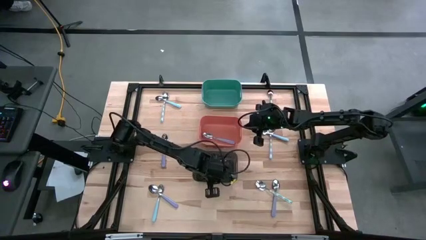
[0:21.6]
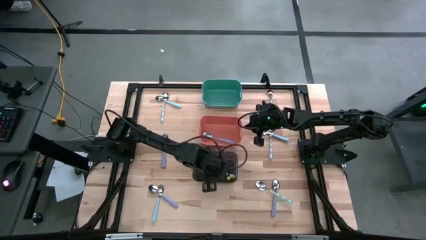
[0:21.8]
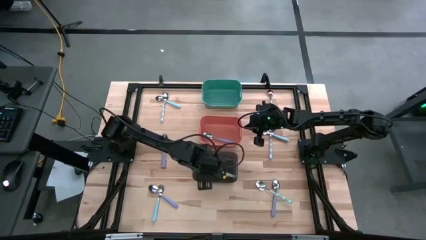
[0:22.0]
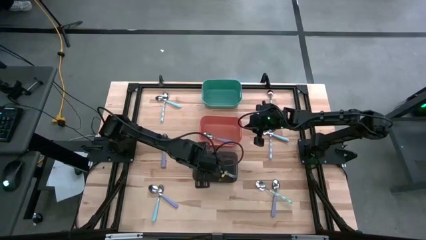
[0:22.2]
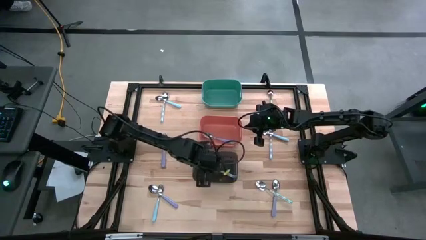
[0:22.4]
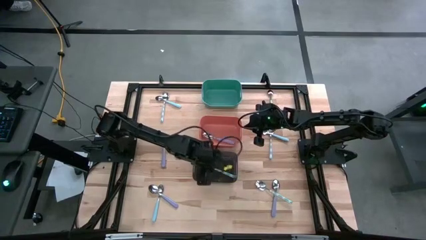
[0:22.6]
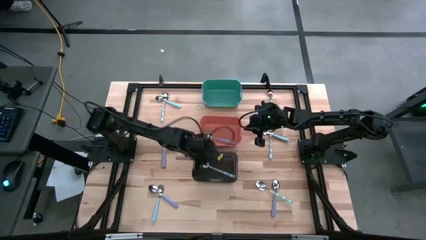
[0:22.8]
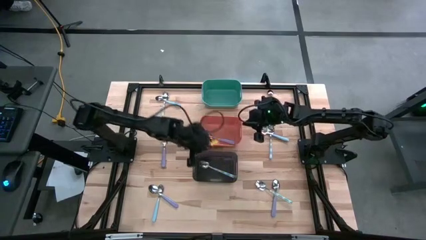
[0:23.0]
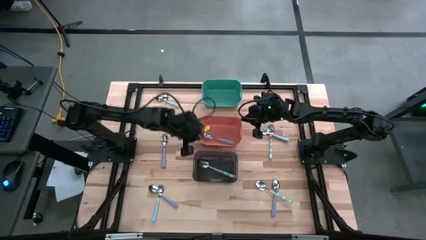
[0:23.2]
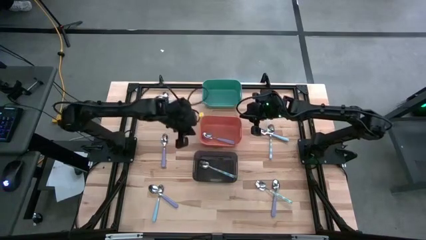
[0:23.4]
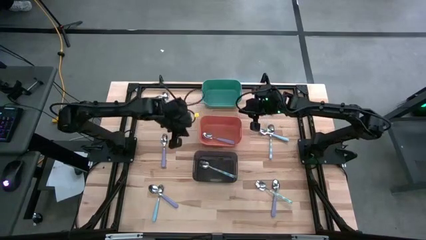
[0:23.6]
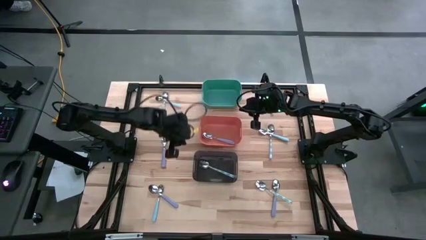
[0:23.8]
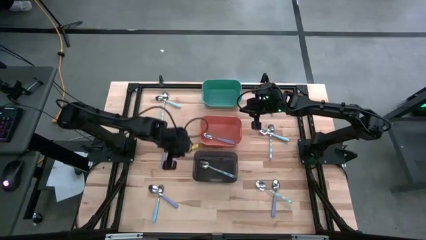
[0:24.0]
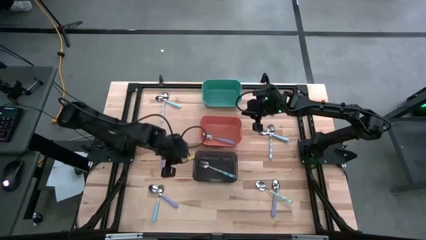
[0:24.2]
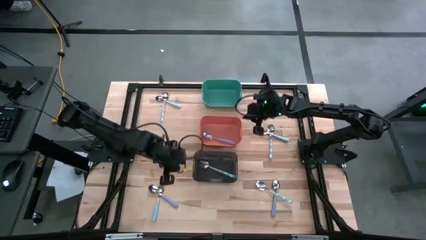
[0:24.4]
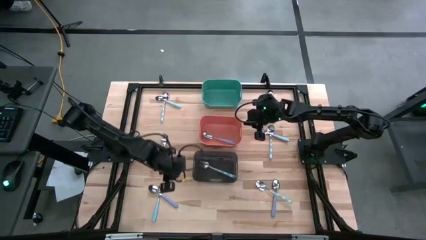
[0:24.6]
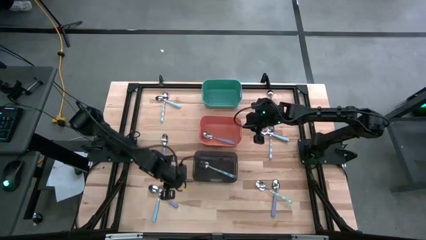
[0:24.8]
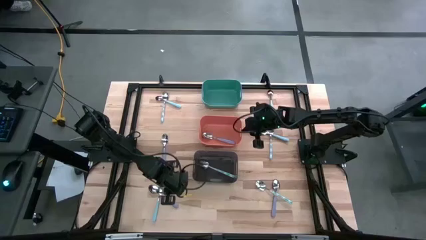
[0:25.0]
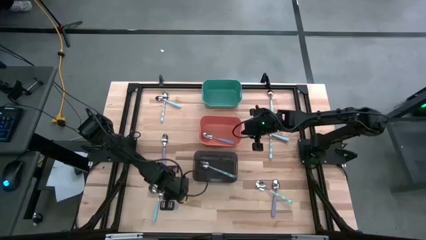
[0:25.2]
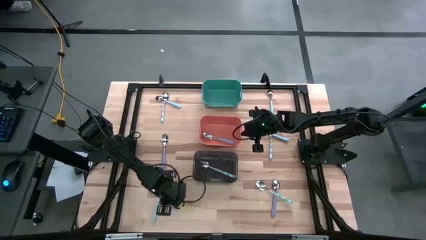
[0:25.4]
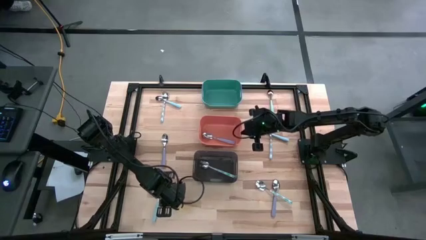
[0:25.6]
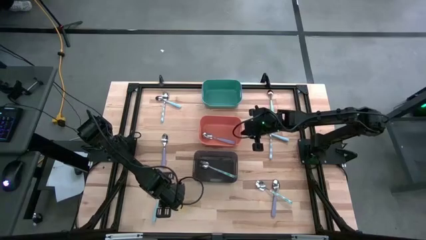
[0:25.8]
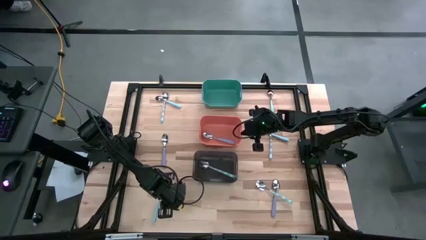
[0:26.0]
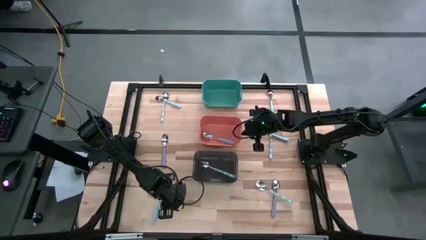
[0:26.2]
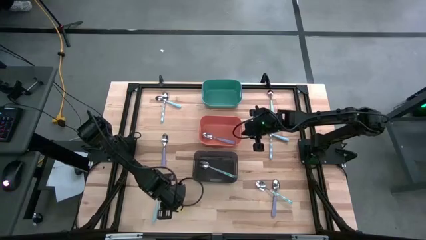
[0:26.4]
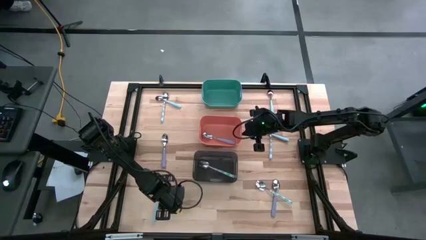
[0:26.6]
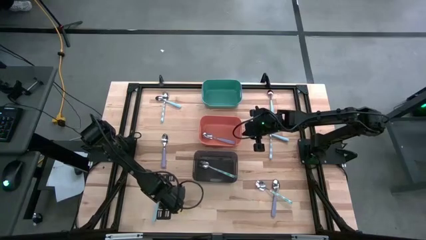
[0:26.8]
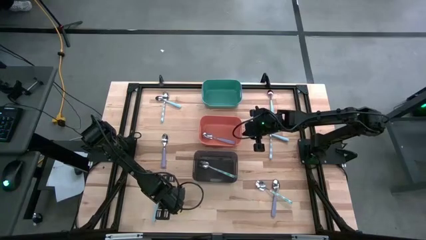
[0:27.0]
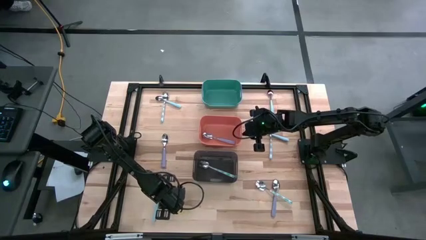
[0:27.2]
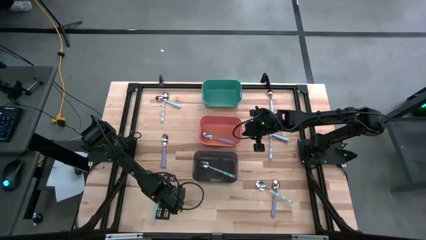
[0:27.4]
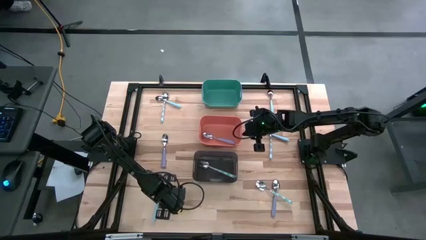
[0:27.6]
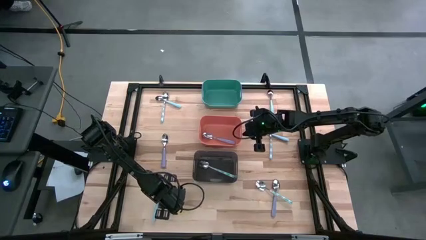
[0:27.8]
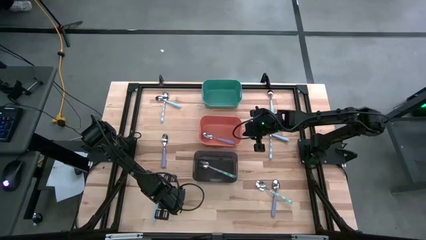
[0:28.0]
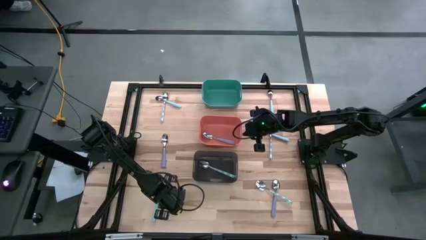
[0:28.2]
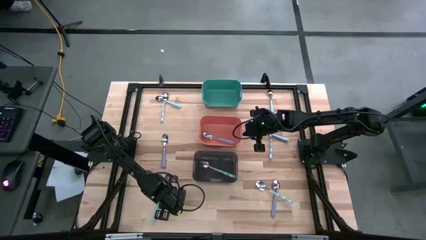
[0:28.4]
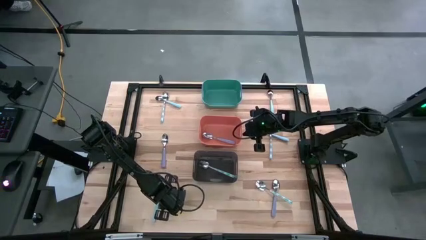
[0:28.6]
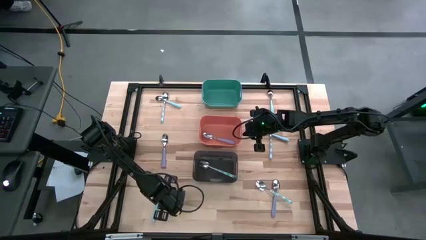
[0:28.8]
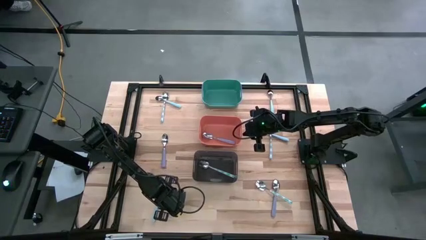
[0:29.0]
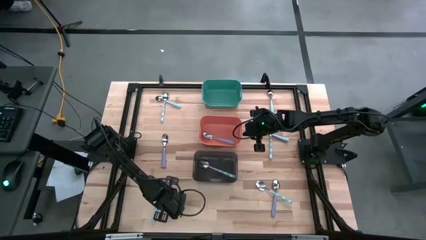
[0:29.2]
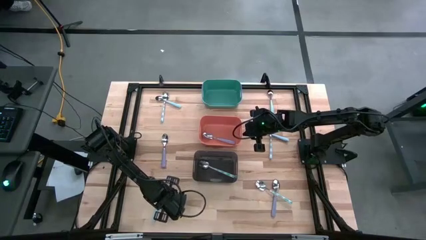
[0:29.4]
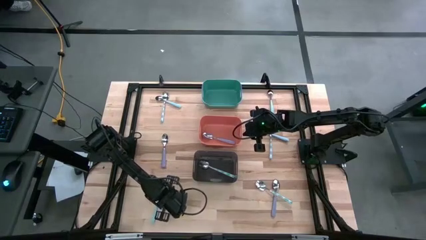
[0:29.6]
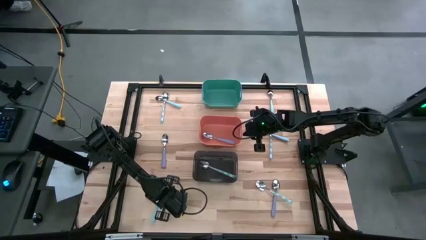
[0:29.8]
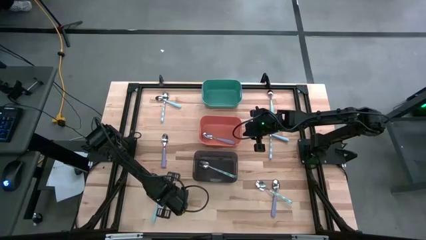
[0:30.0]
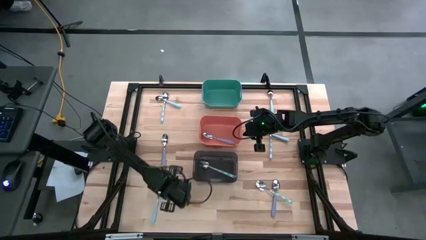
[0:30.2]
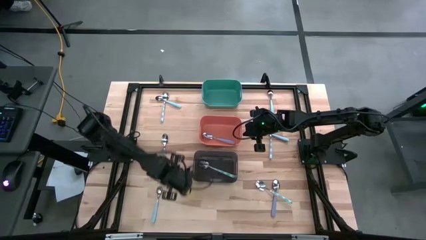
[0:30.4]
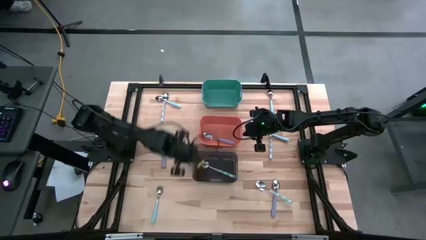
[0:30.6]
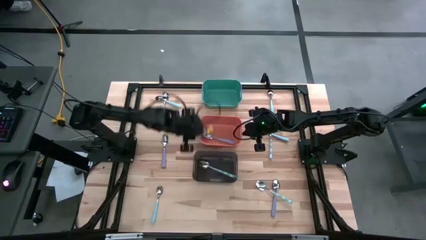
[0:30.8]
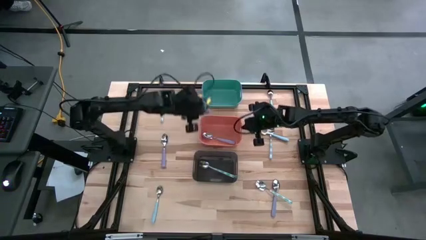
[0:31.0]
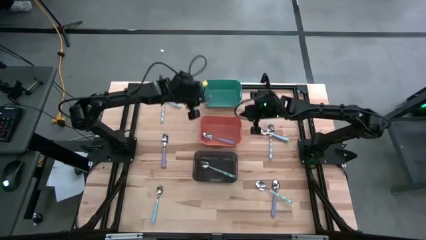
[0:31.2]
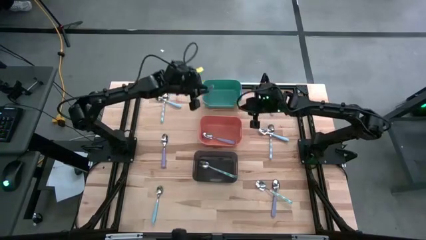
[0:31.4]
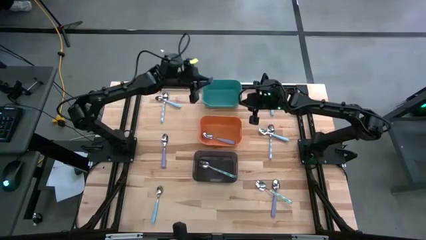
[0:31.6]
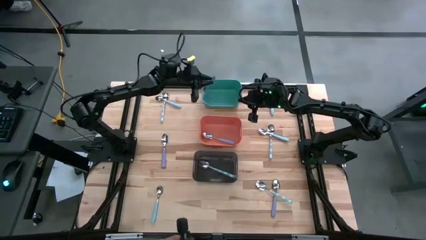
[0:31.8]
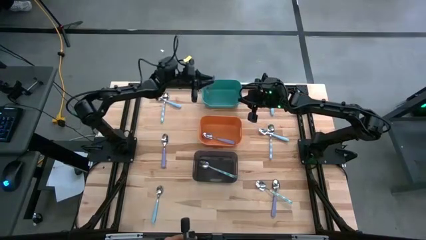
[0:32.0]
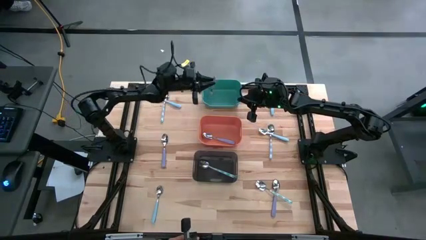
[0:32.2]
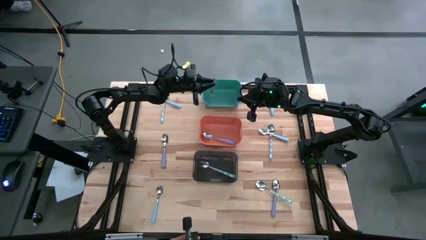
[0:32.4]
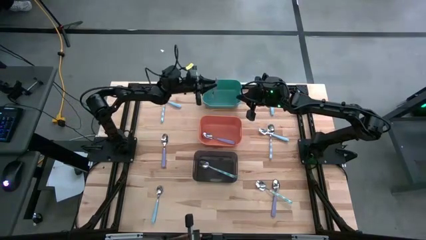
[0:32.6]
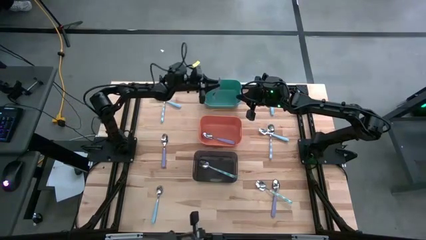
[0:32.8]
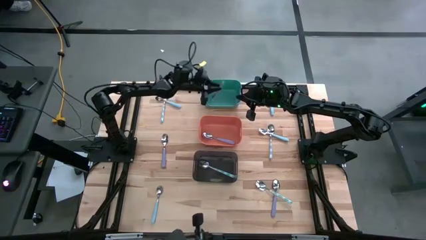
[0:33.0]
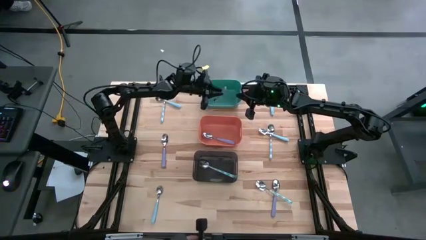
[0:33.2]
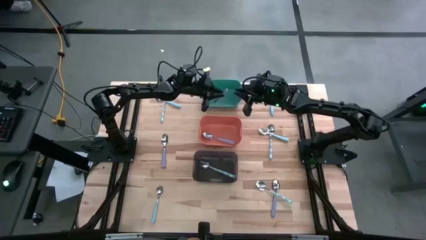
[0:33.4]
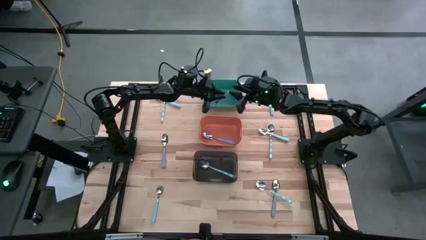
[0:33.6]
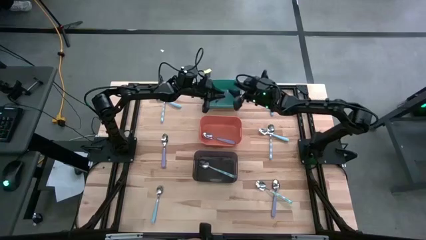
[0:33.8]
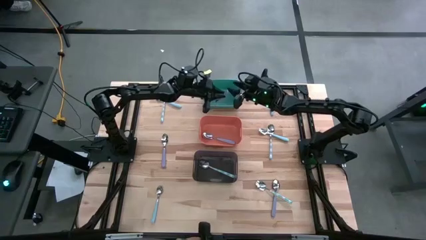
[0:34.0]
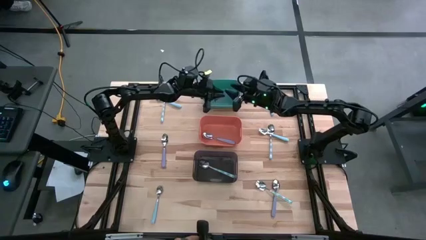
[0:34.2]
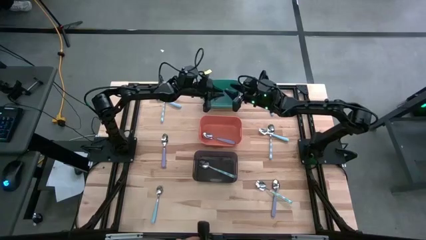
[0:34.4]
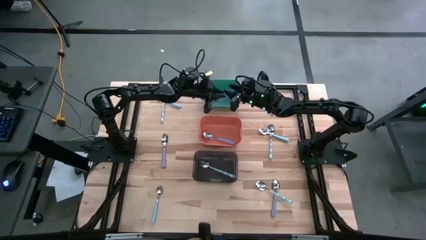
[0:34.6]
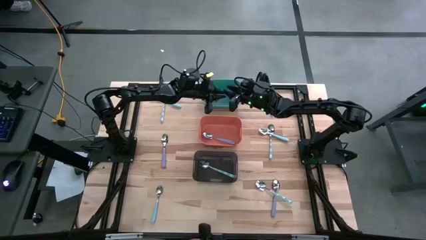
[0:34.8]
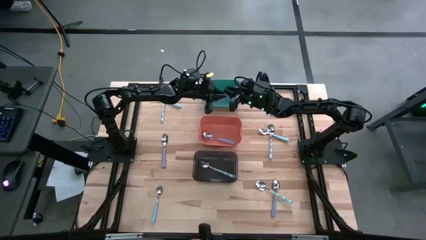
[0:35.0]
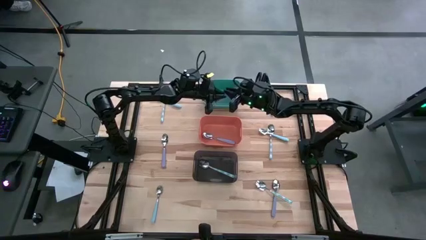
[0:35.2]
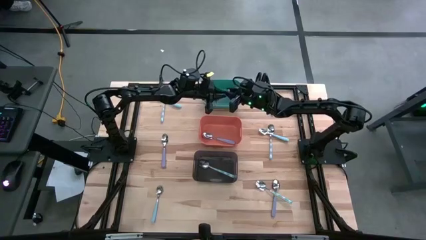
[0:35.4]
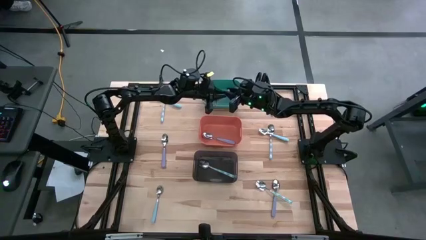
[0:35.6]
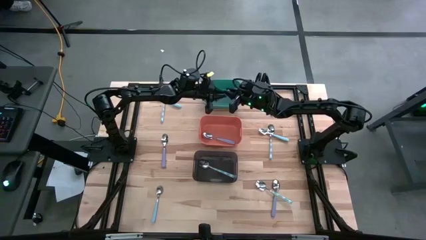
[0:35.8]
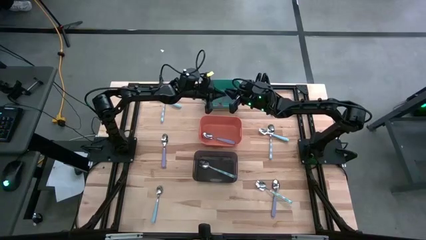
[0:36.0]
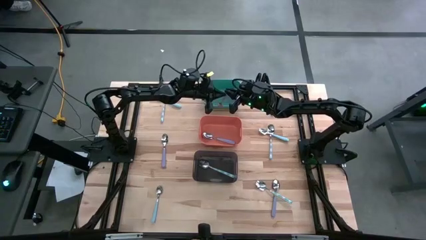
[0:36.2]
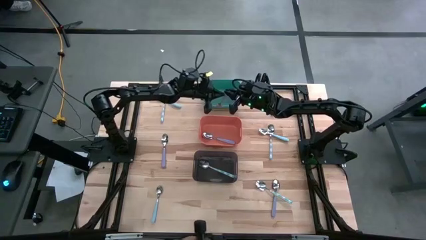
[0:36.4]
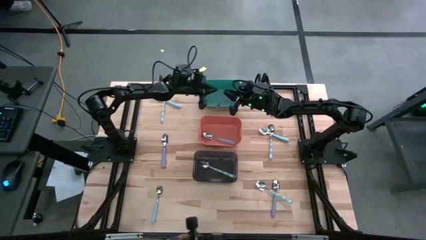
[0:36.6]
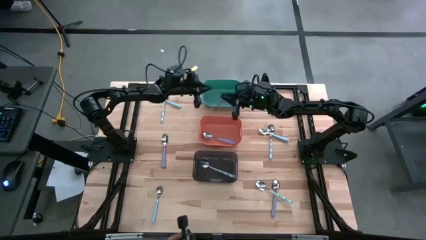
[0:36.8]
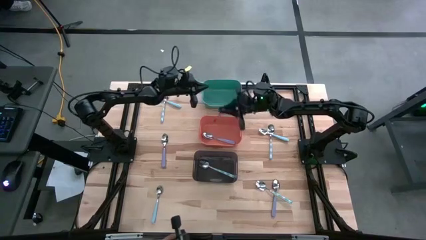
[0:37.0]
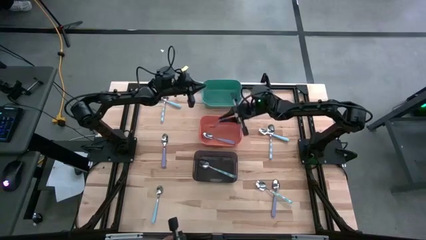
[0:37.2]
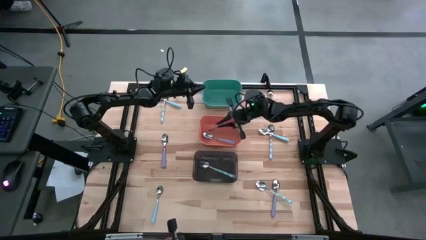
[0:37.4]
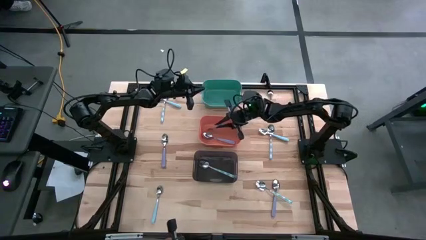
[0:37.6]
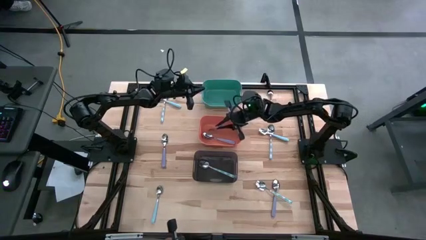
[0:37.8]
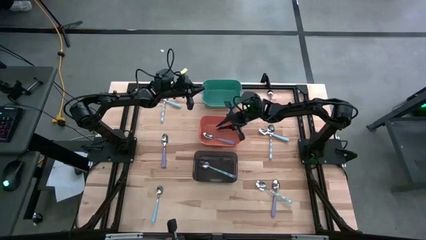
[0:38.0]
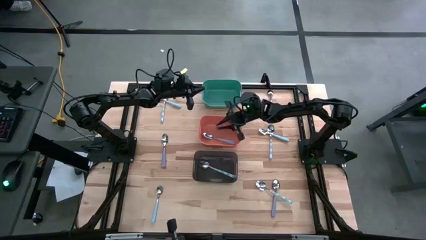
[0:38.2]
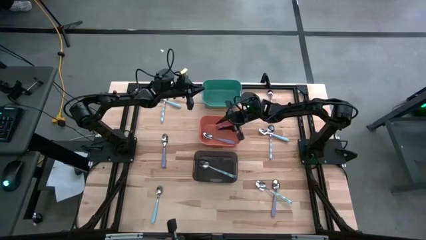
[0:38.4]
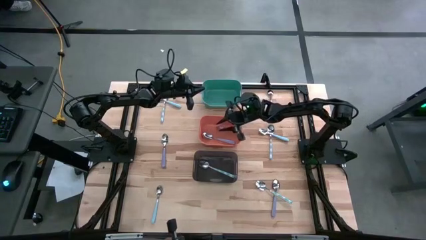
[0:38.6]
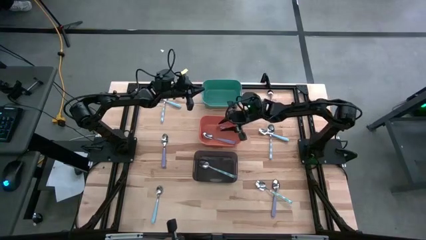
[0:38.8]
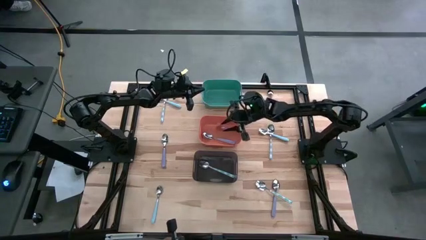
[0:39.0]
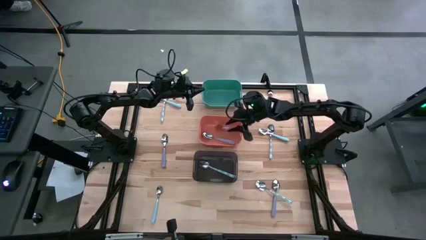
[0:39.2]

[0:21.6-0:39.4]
Task: Sort silverware by color (type)
Put the bottom left violet spoon into the orange bin
